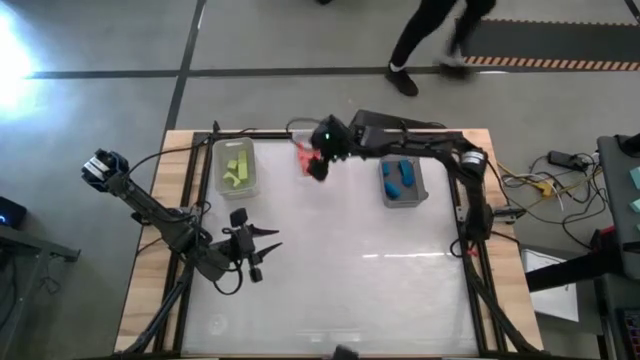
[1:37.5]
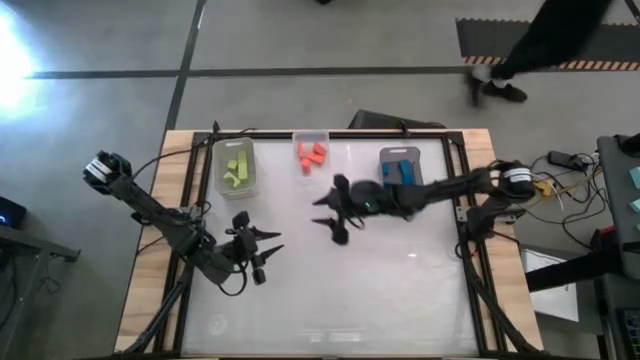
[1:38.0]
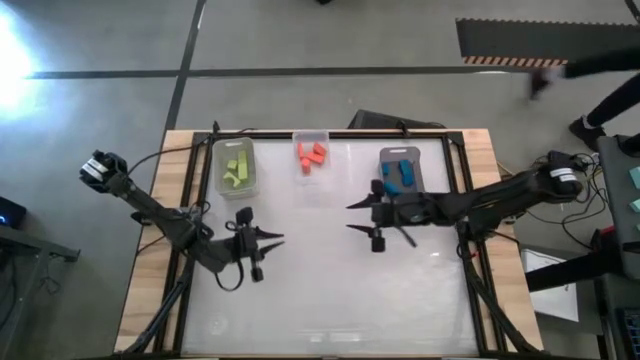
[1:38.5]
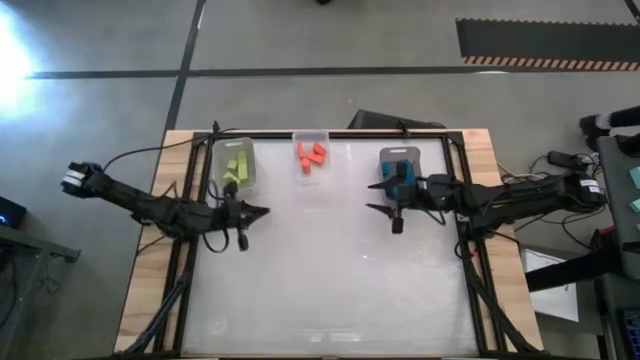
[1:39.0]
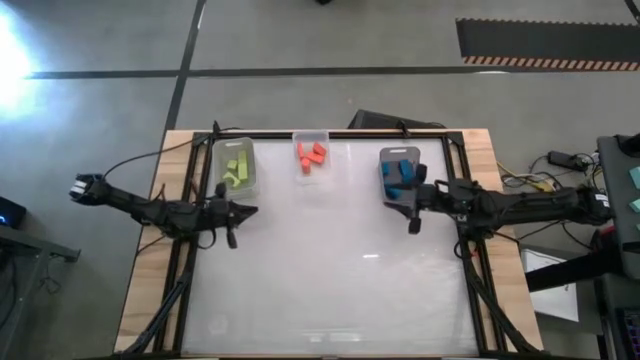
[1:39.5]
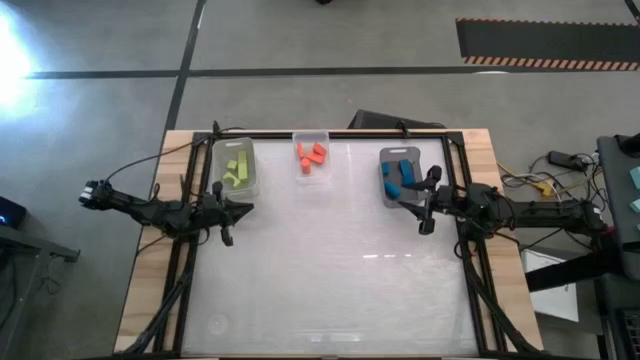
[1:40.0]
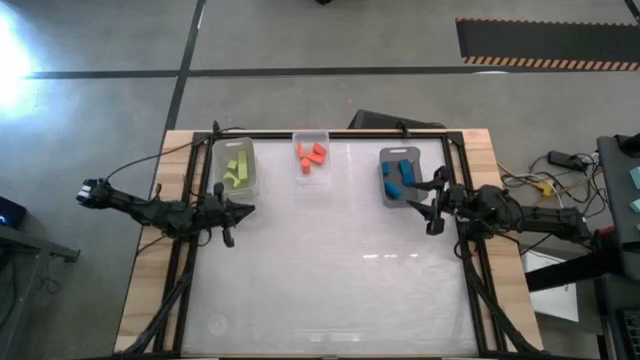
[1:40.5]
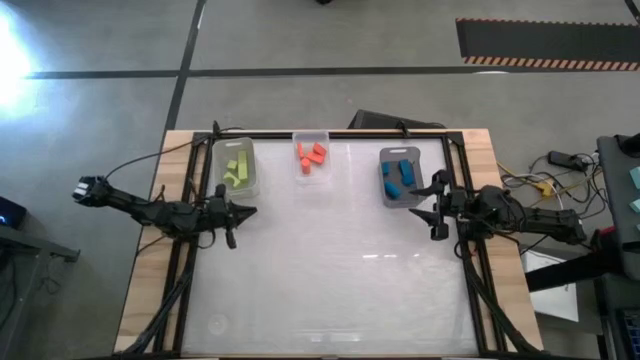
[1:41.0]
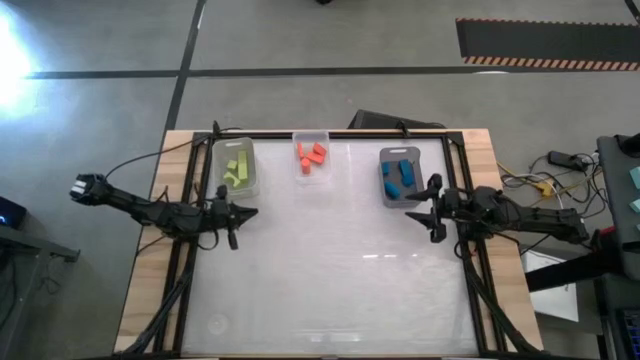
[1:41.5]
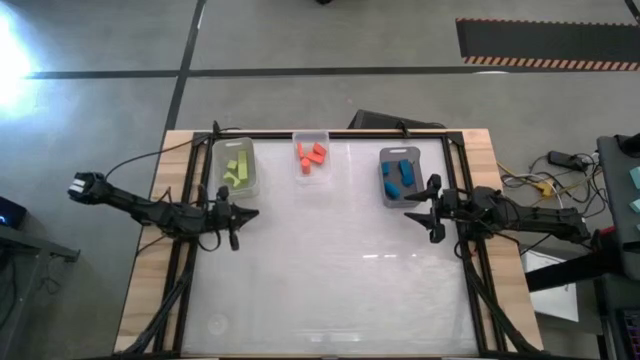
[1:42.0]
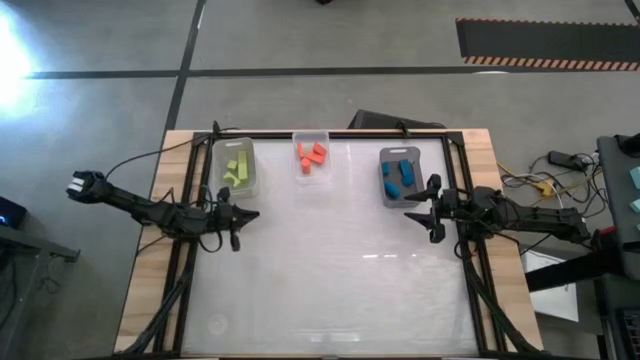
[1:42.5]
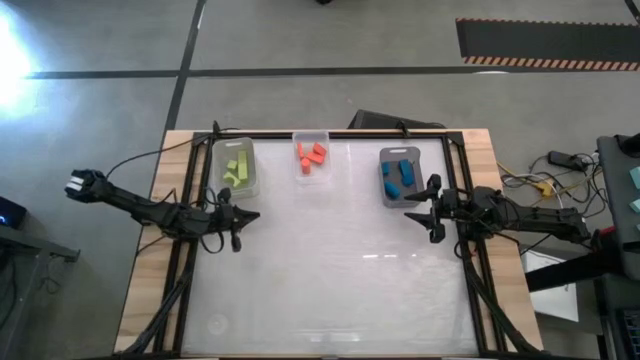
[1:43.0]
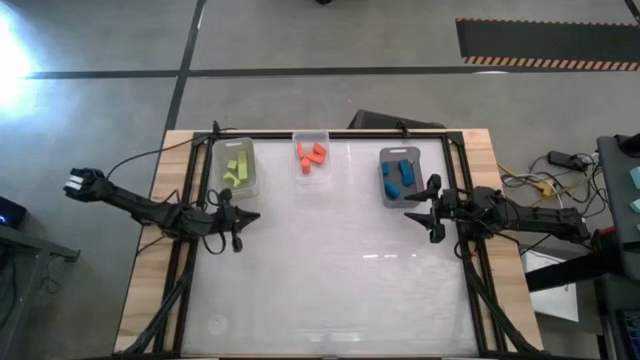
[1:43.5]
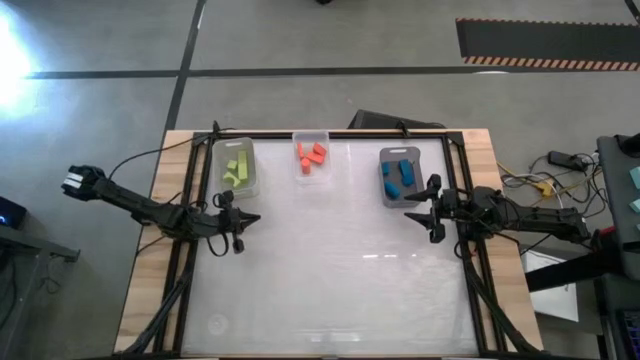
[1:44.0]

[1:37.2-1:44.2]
Task: Sort & place blocks by color
Return to Home Position

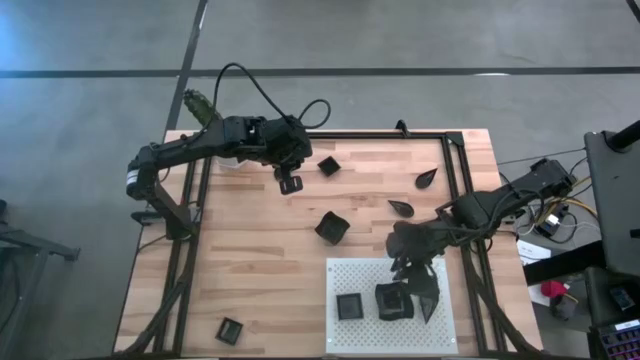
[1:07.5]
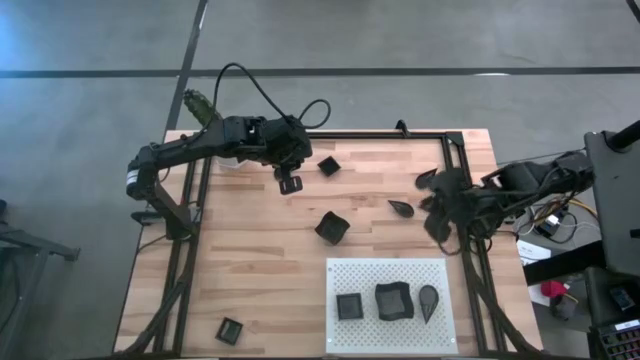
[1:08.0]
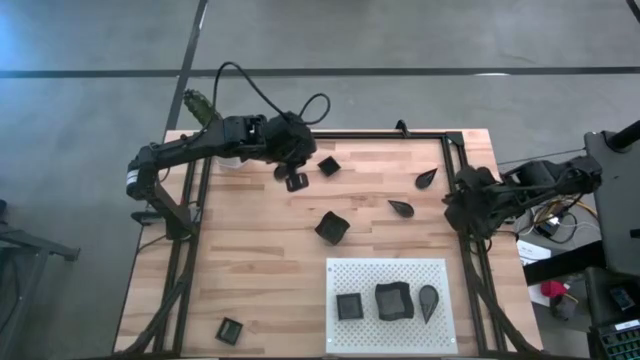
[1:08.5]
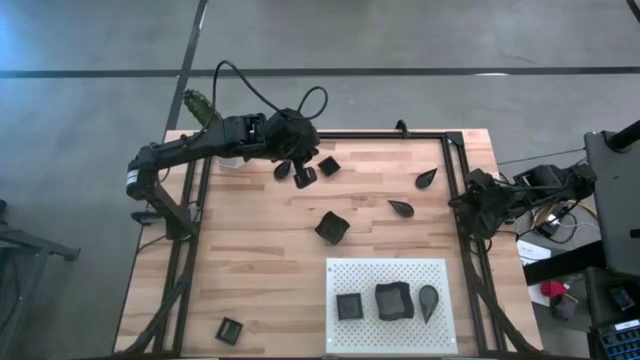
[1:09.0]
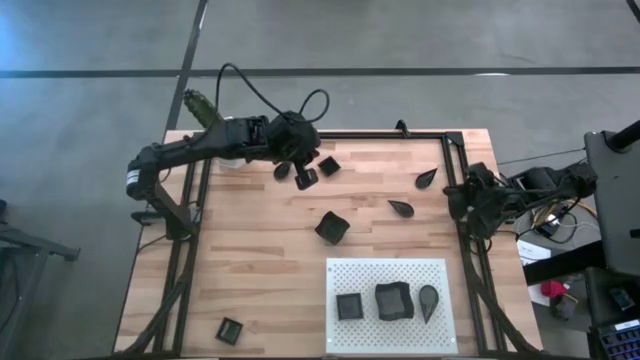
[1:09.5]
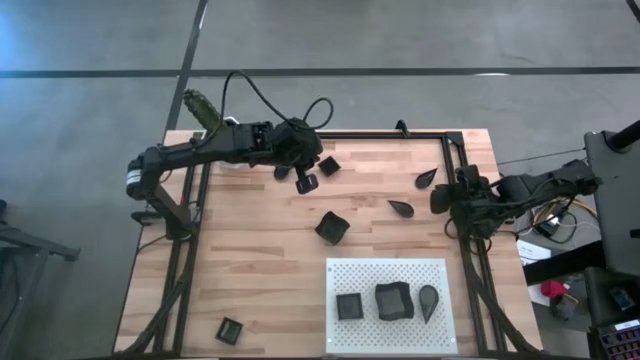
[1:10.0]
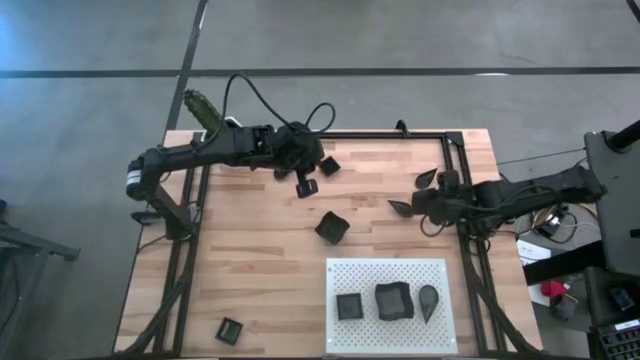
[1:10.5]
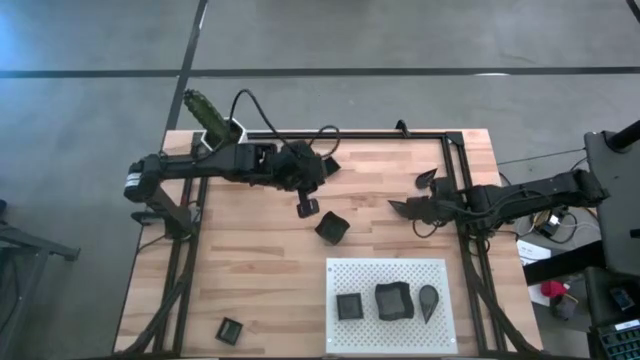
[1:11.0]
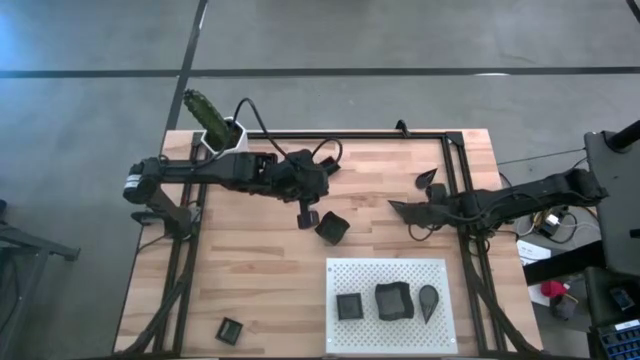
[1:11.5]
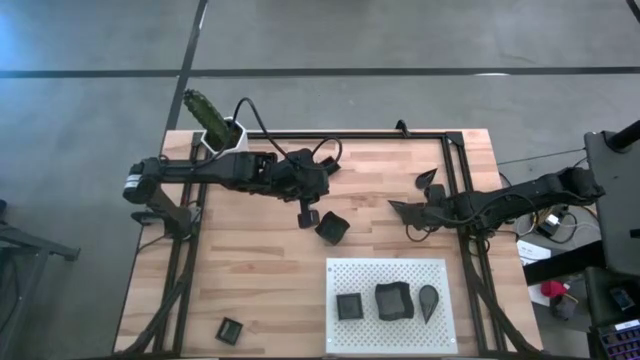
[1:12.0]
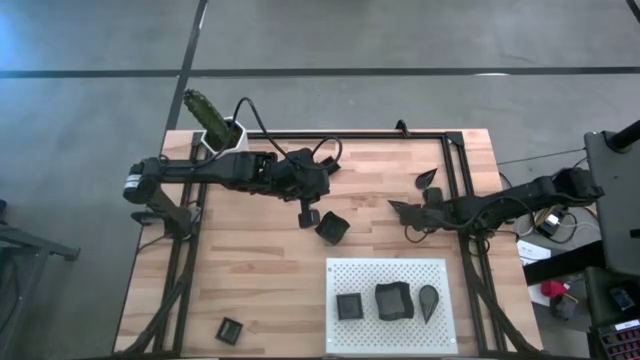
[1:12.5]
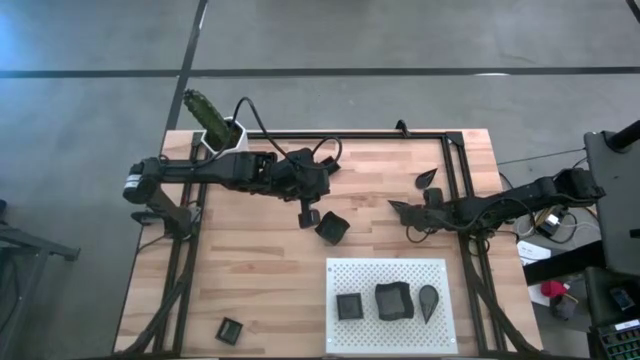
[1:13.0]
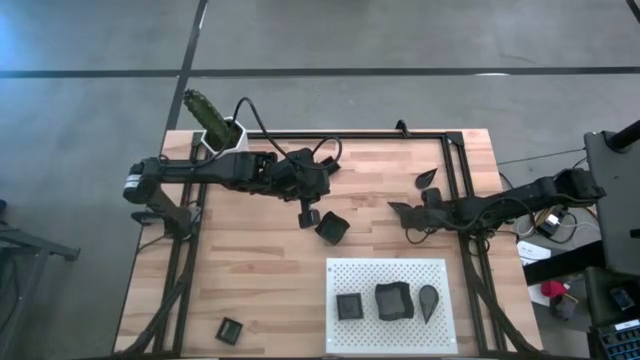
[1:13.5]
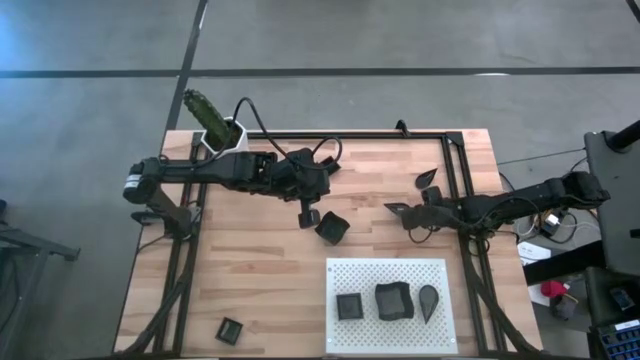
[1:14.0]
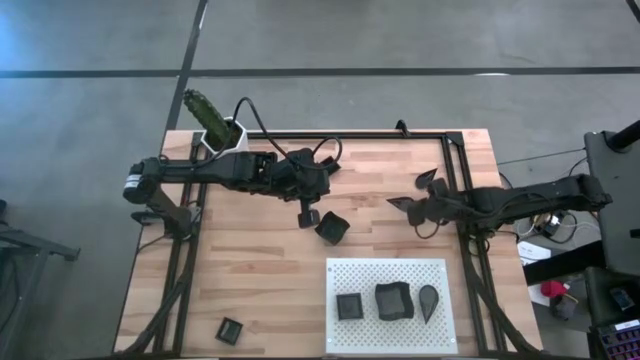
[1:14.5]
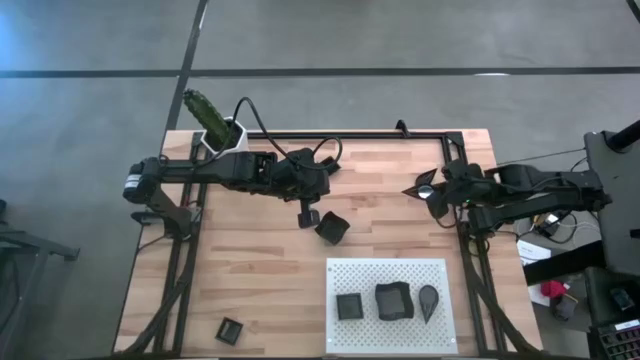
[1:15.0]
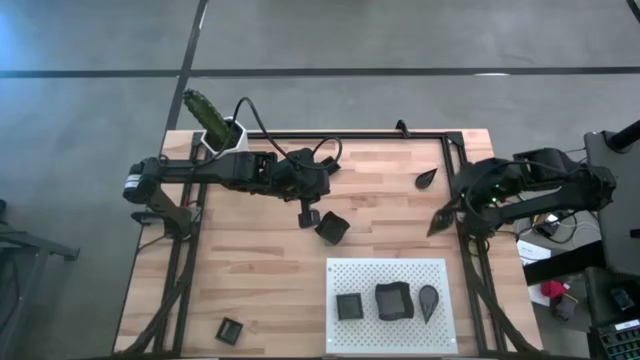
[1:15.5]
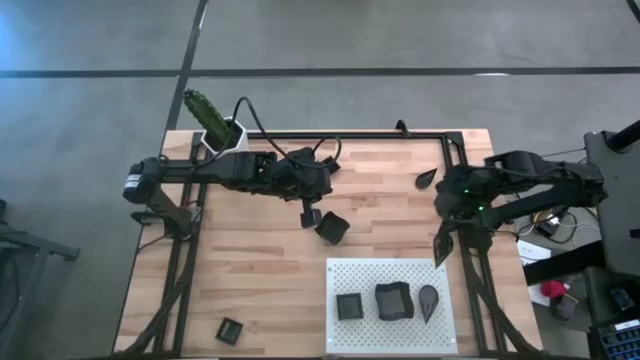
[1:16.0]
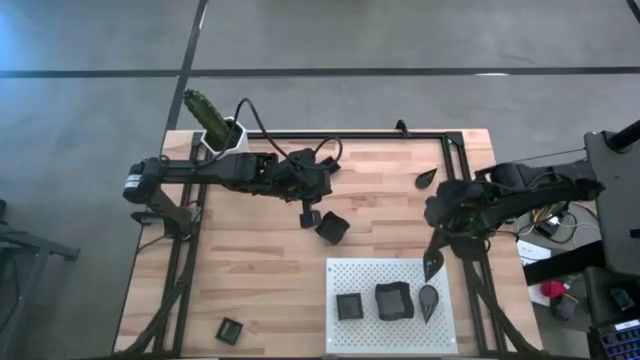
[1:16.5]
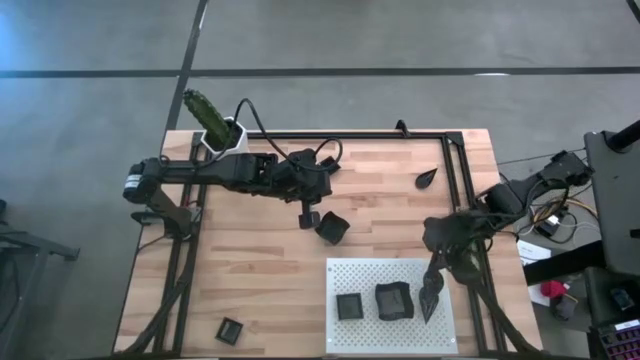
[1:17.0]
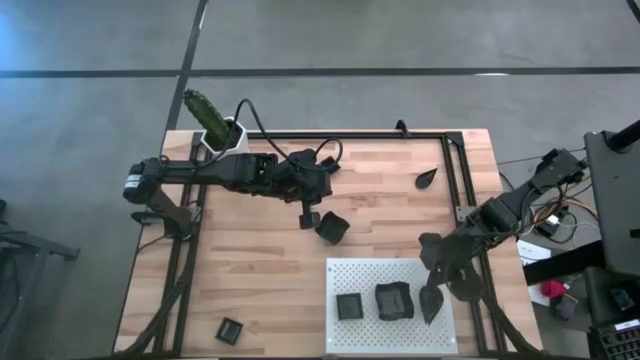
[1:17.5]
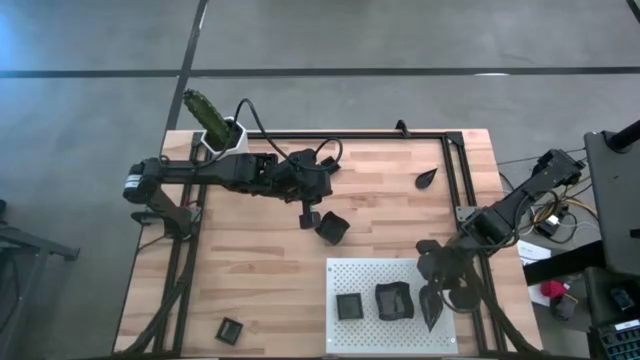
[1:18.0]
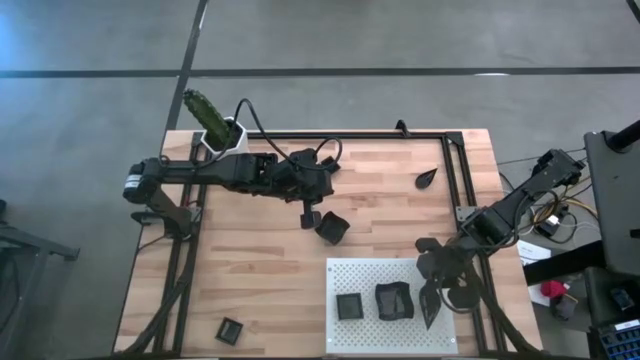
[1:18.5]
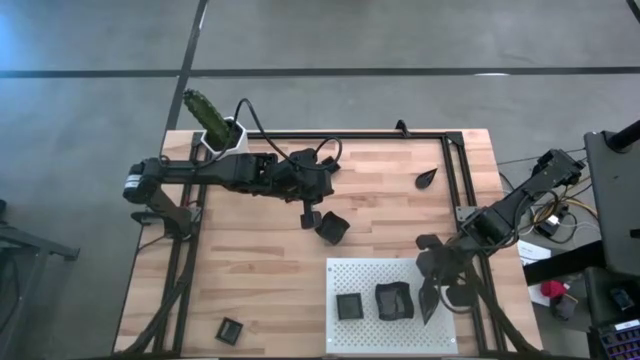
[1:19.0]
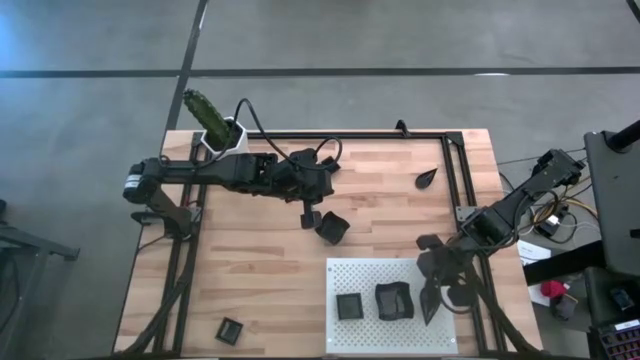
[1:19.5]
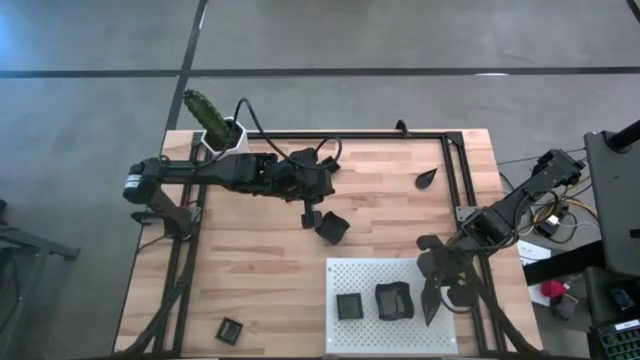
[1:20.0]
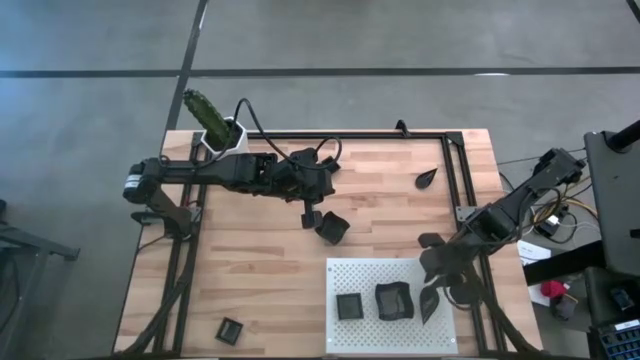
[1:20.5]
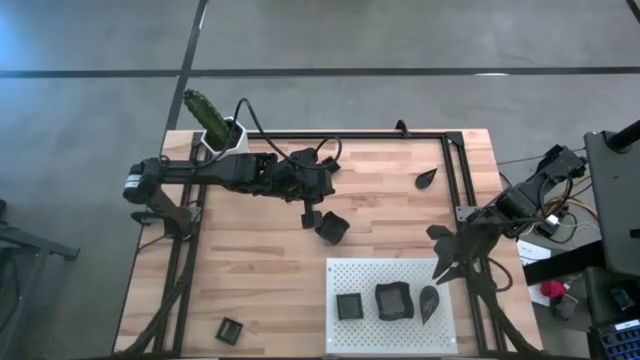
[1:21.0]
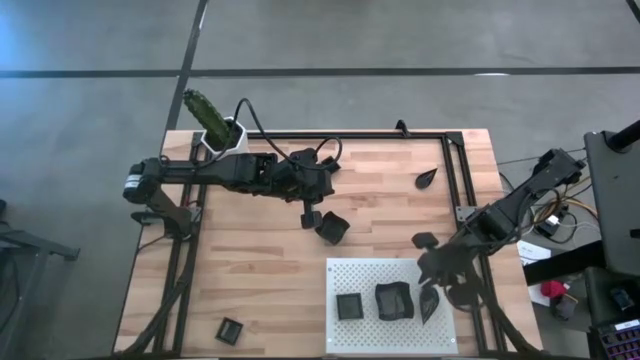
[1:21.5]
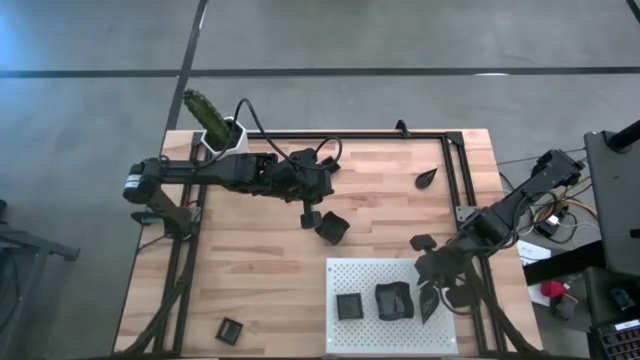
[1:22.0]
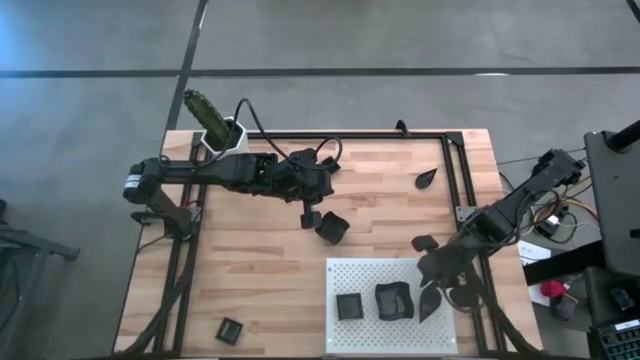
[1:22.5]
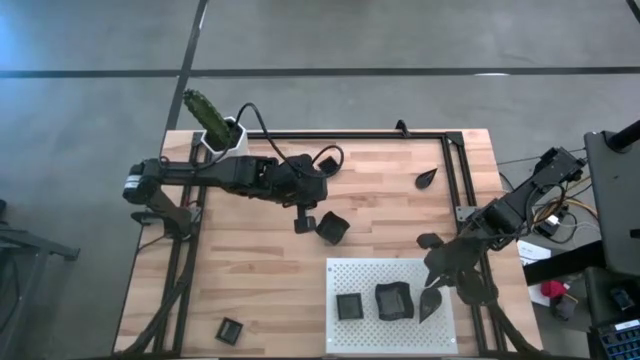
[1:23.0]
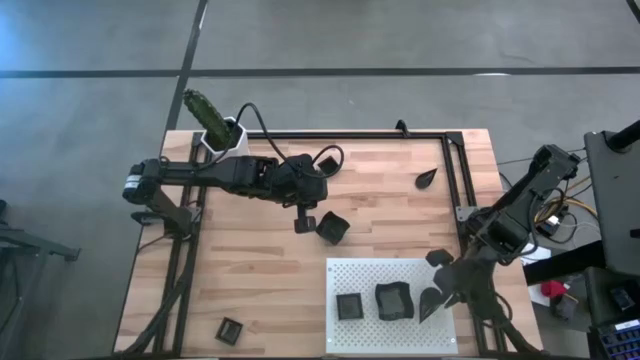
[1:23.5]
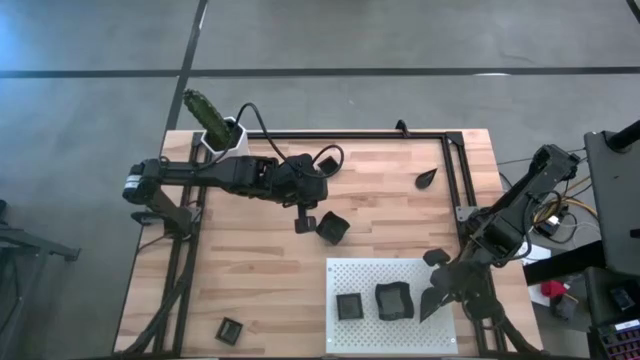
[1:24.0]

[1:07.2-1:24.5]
Task: Pick & Place Mini shaped plates
Stack the drop-shaped plate on top of the drop-shaped plate on the shelf
